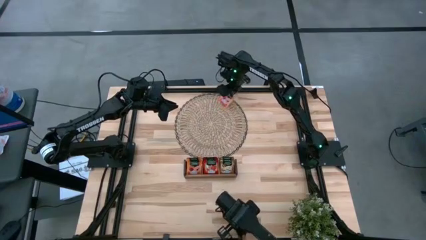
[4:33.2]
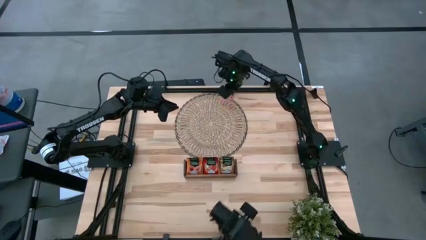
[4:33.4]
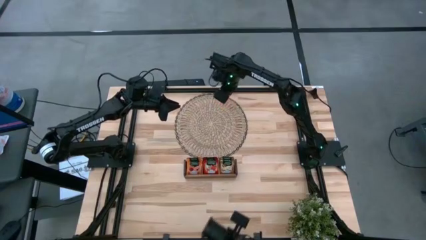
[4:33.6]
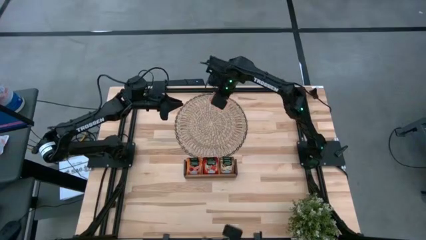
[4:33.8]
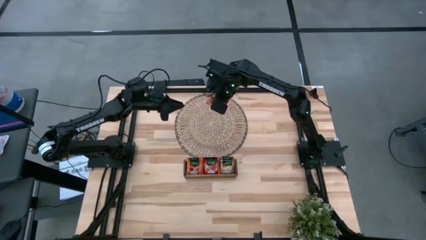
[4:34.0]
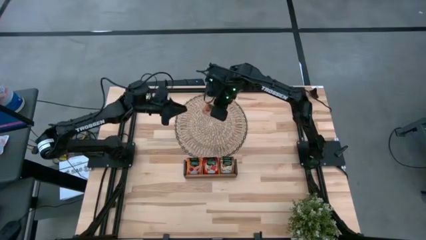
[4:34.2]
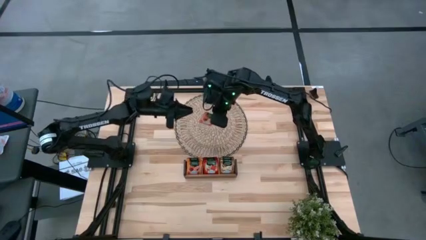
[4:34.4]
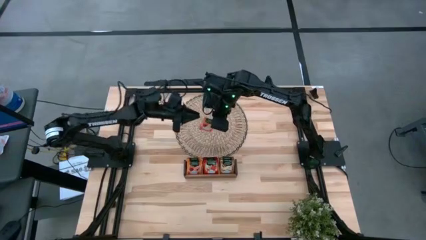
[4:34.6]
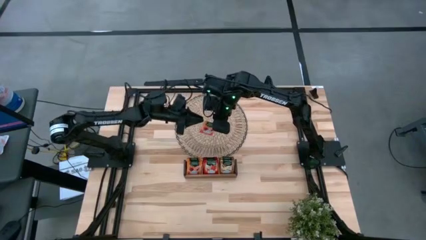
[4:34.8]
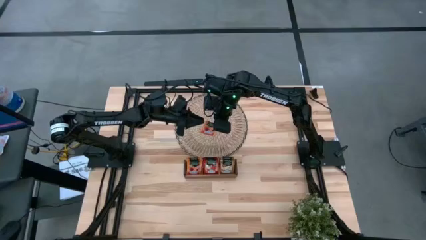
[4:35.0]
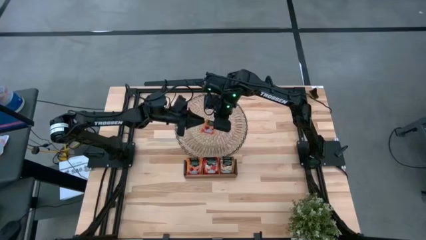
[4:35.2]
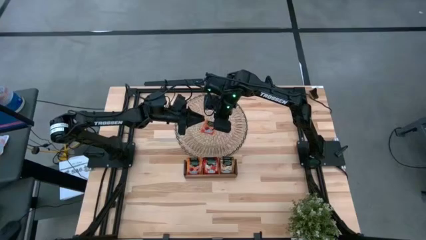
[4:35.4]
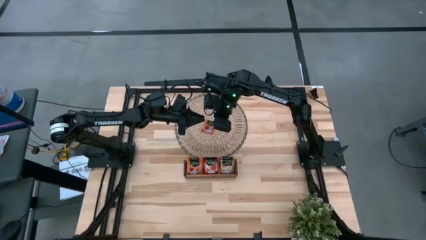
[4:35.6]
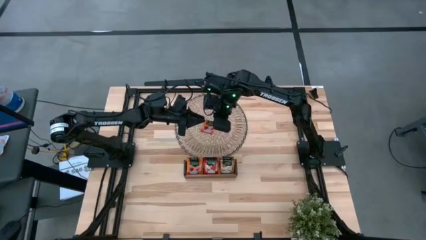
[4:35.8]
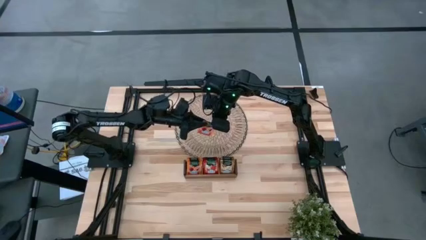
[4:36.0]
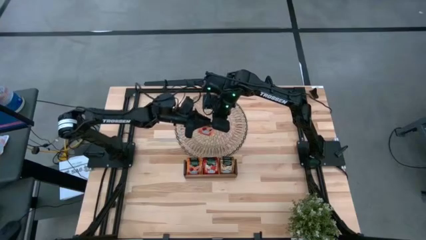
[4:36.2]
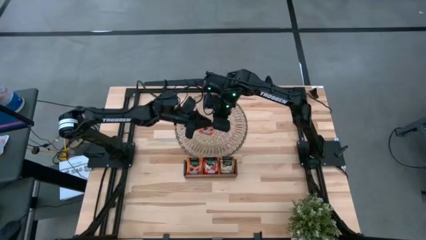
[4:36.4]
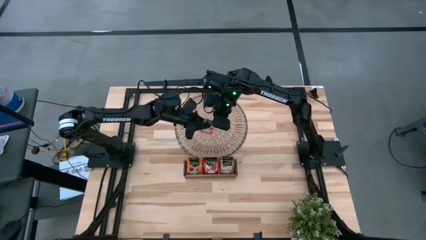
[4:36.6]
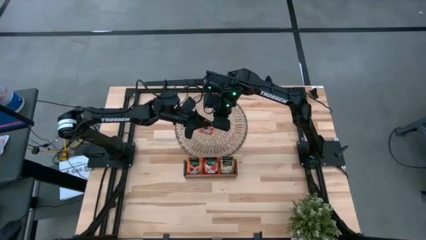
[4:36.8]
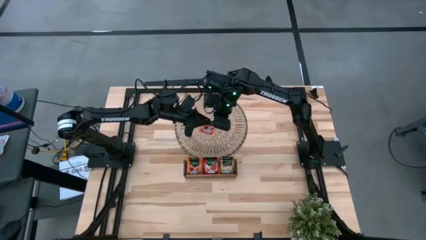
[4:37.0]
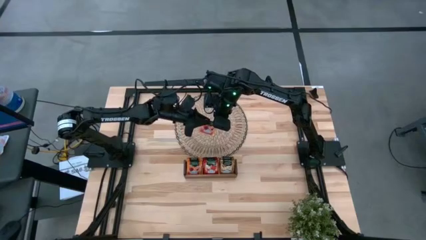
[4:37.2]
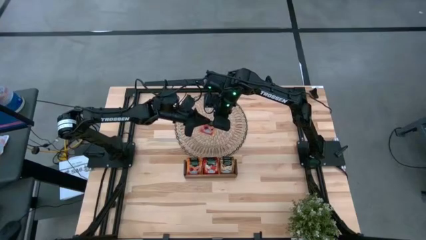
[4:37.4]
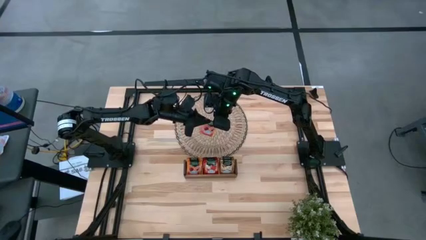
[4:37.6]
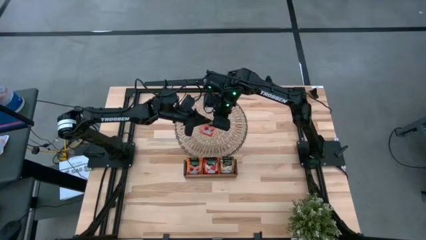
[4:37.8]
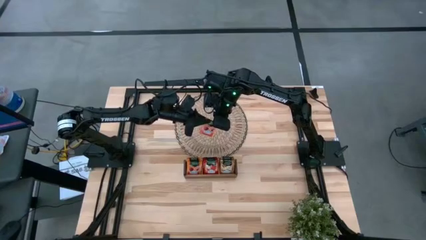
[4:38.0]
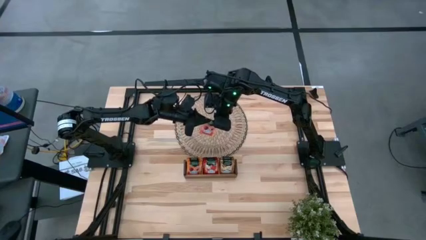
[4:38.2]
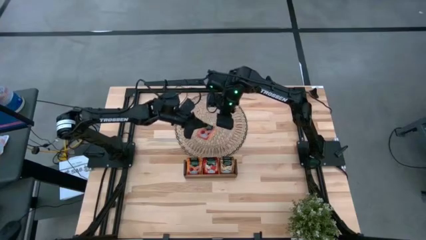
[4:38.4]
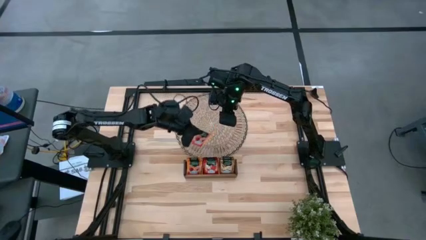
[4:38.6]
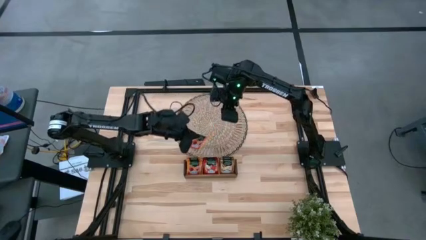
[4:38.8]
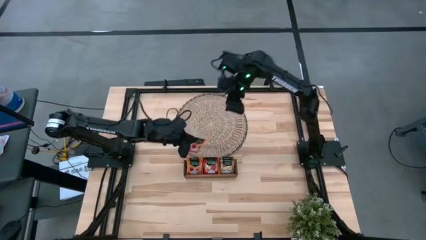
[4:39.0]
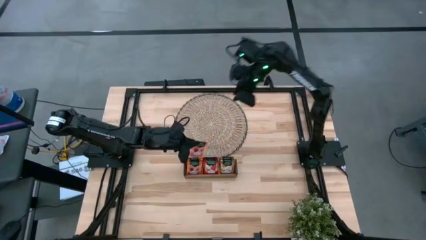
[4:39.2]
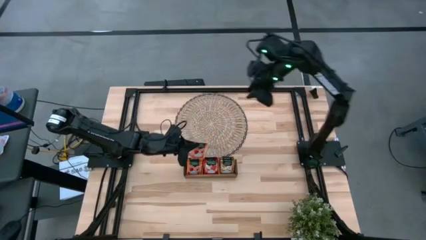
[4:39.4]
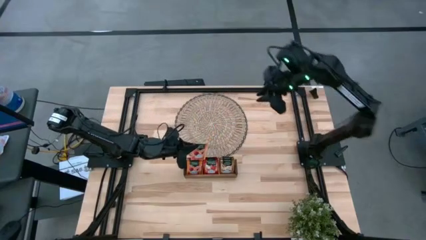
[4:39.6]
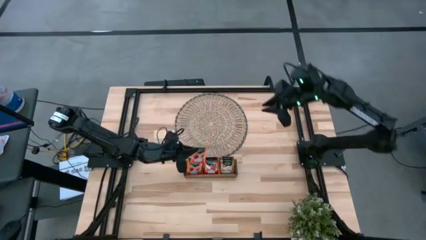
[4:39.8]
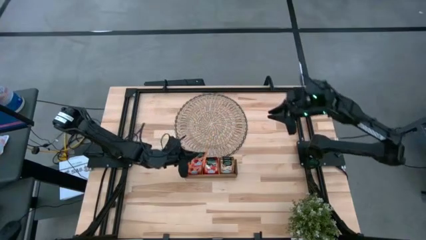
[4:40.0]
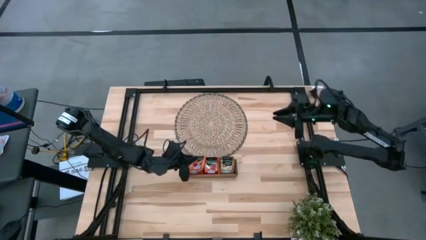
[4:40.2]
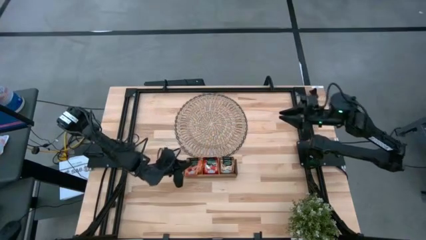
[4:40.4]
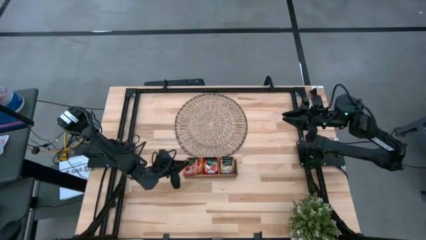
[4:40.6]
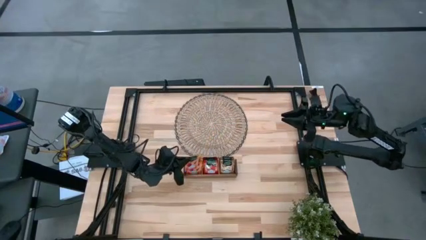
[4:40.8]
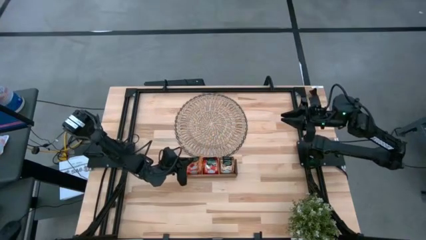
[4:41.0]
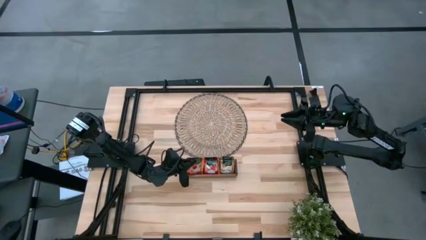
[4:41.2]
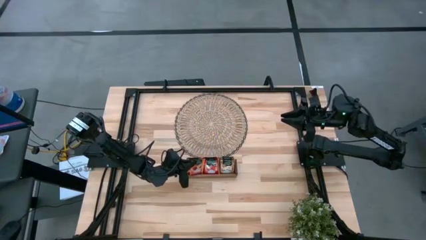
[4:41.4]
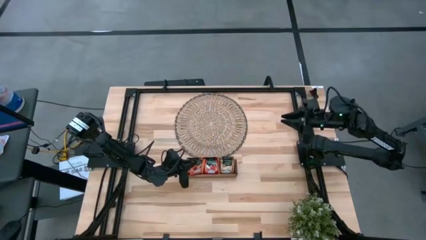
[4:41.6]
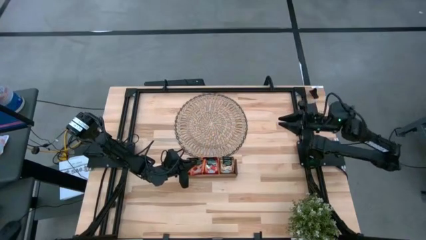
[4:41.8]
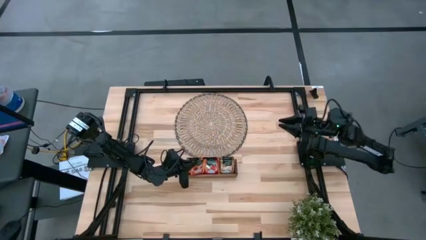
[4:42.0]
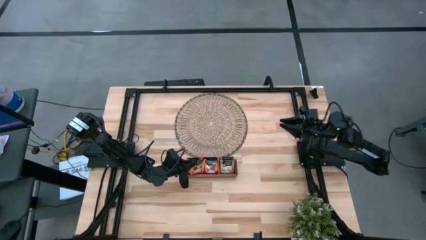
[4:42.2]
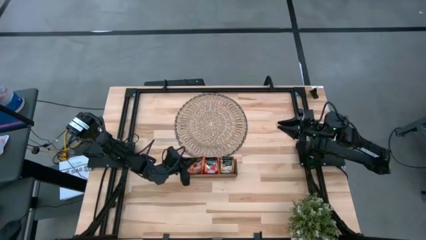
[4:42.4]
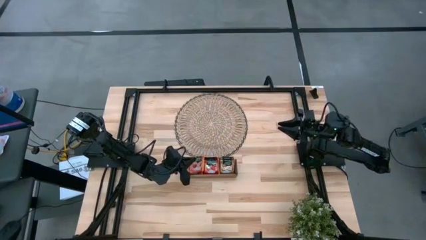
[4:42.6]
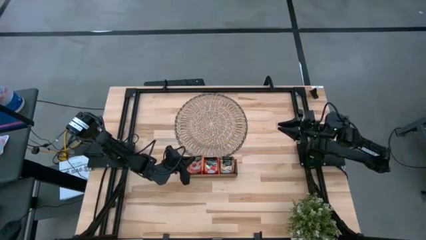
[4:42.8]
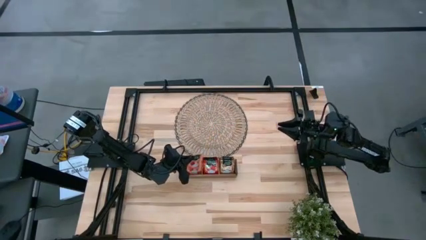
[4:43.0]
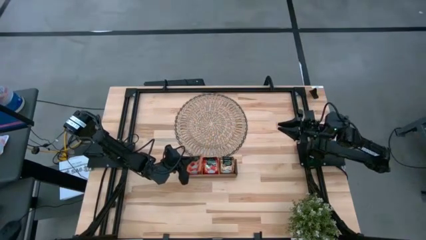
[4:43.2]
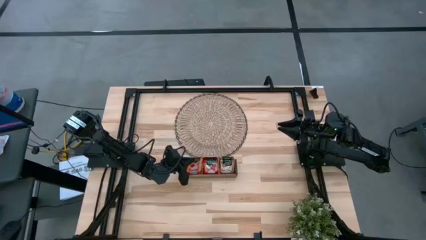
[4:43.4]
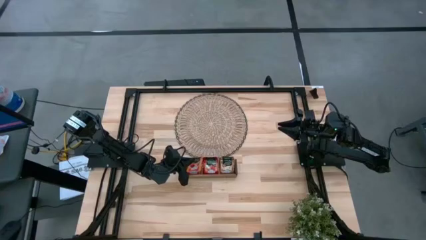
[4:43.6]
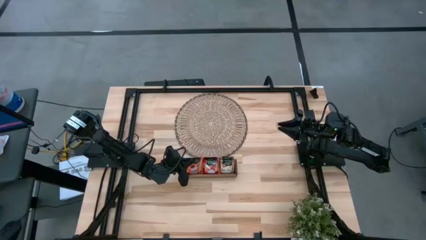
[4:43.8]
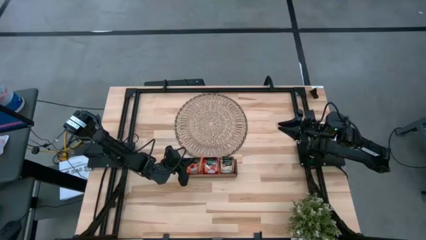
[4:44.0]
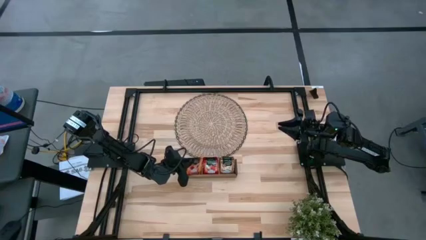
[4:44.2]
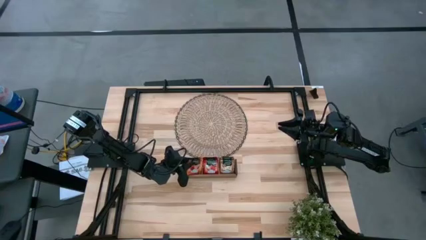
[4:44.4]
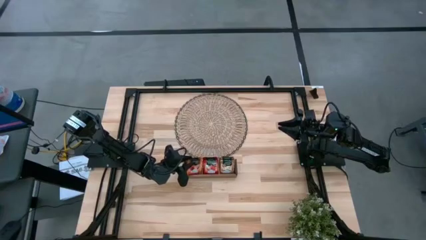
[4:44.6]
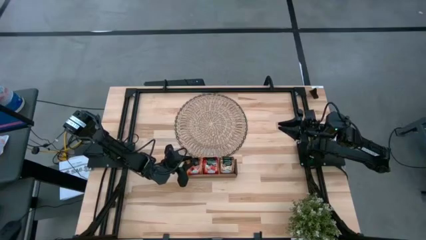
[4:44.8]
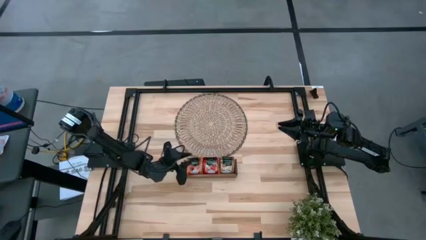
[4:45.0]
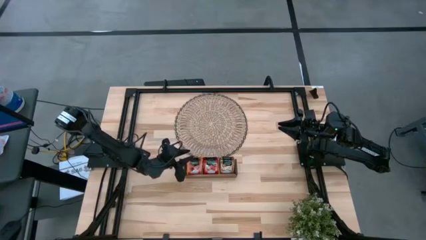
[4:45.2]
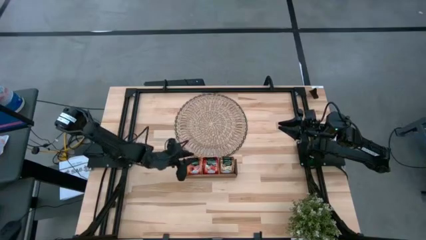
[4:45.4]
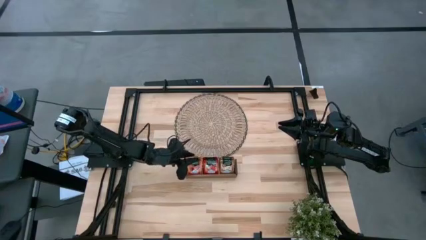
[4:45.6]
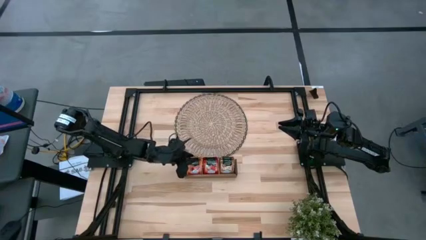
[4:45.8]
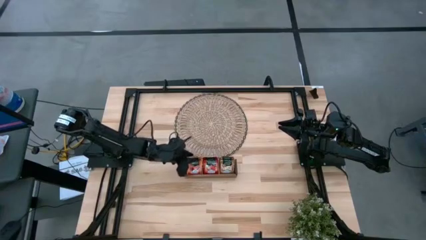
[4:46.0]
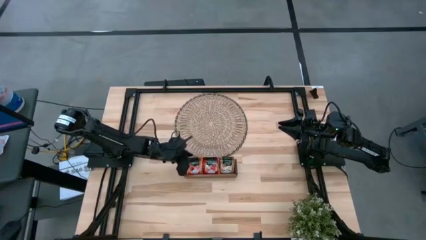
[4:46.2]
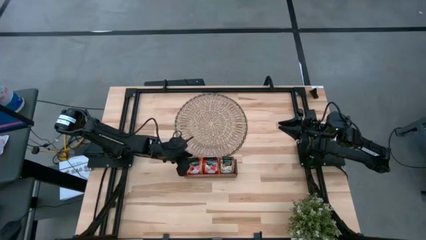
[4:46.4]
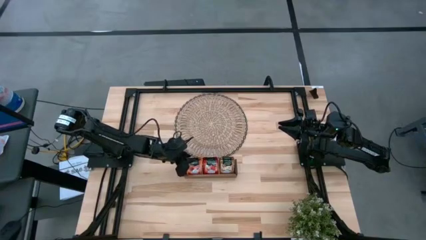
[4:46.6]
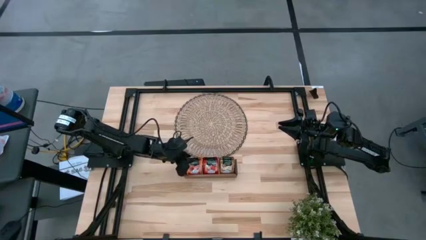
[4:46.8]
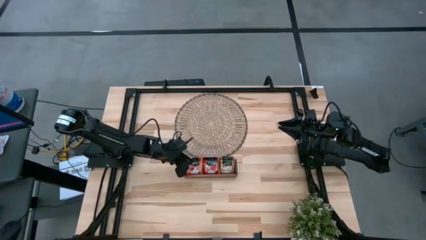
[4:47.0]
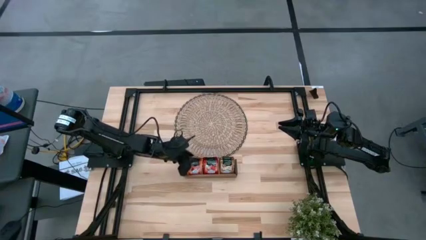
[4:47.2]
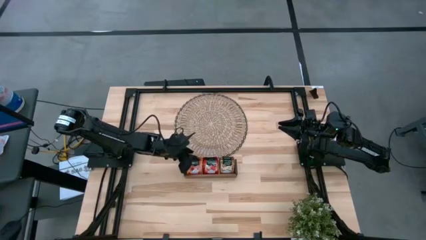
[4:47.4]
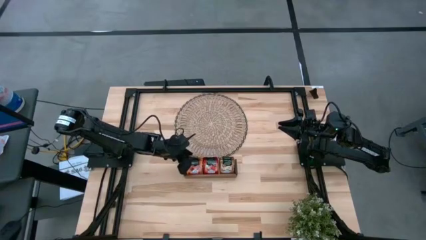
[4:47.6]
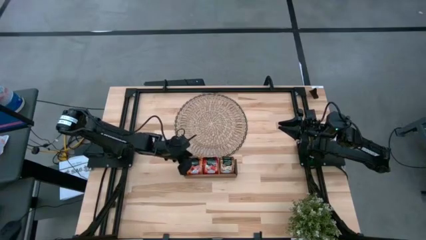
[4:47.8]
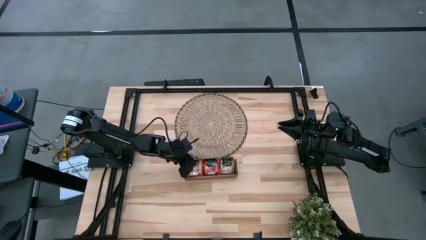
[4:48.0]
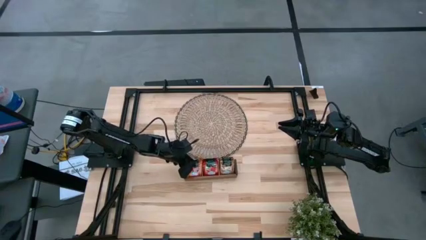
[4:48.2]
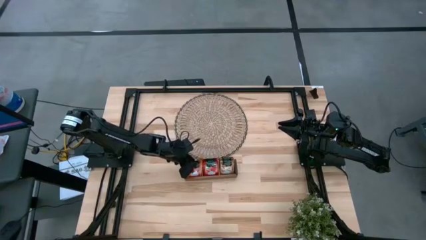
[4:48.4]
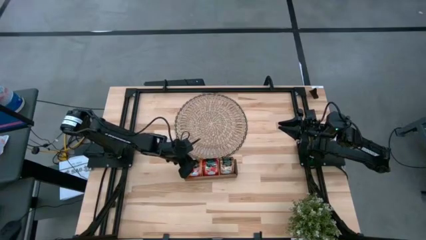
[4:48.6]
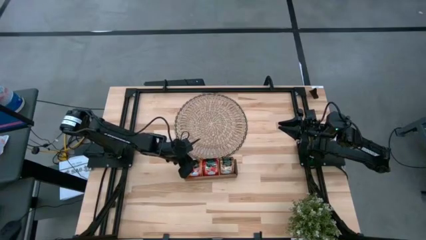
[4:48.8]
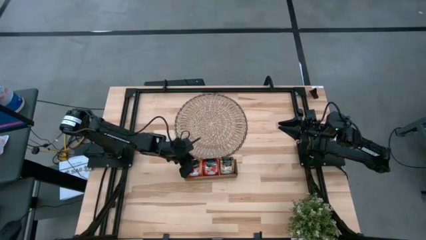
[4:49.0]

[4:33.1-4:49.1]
Task: Pick & Place Tea
Put the orange tea bag into the left section of the wooden organizer
